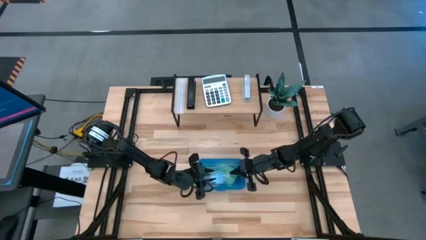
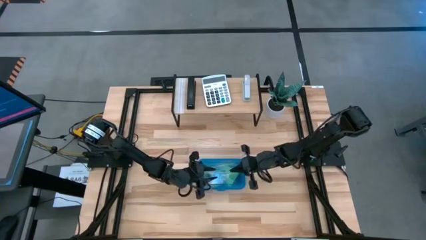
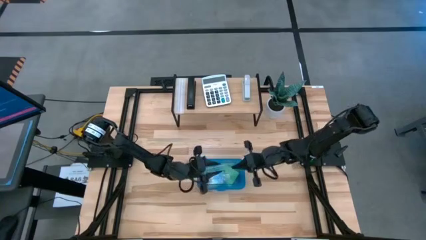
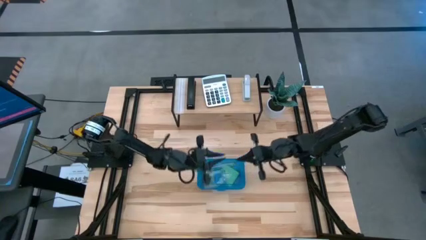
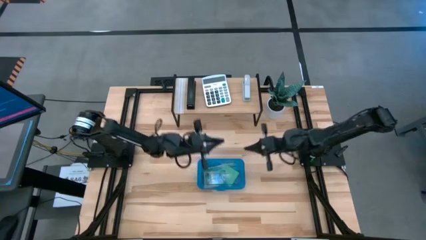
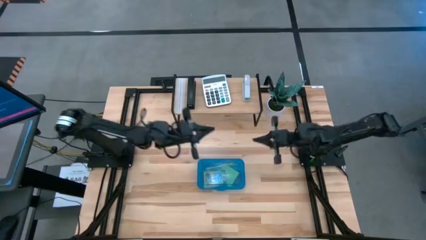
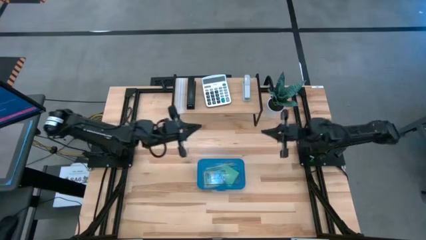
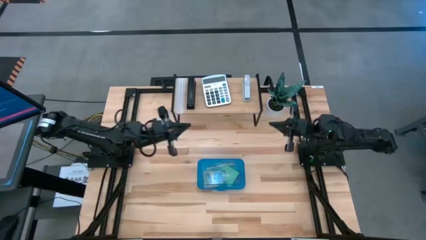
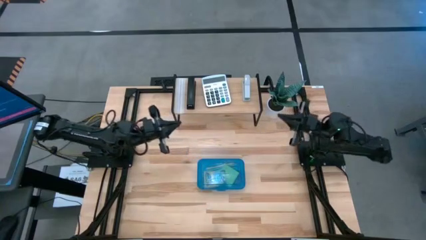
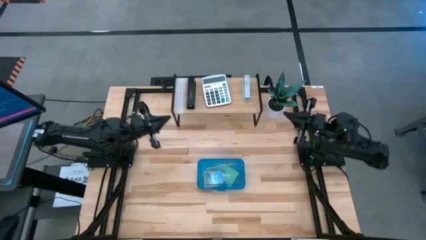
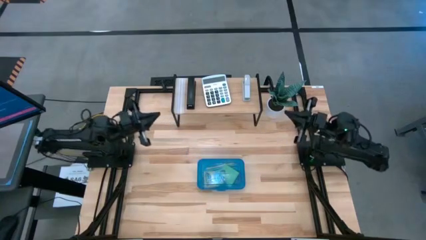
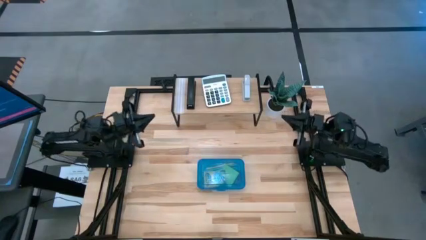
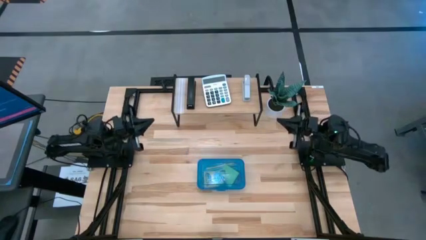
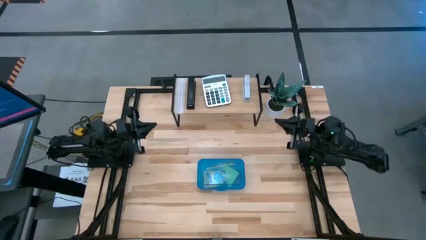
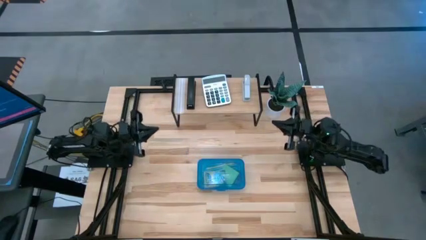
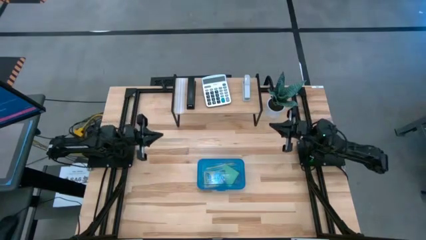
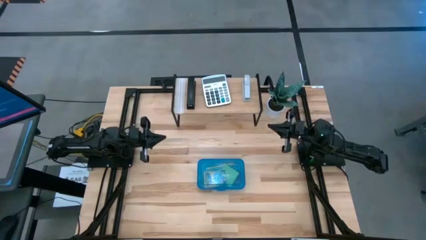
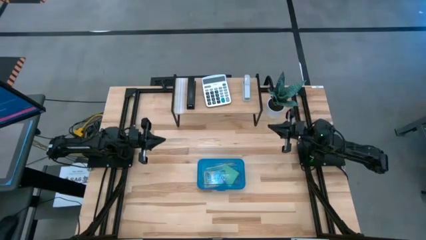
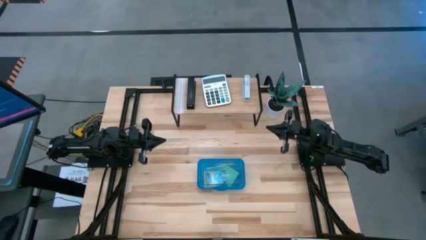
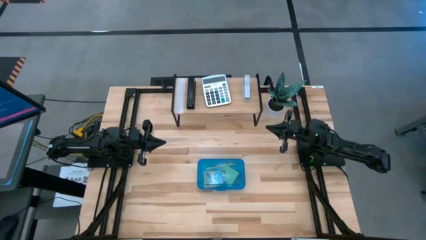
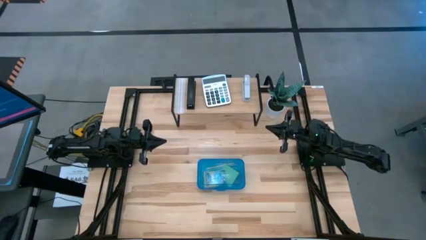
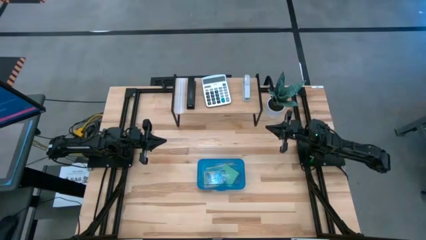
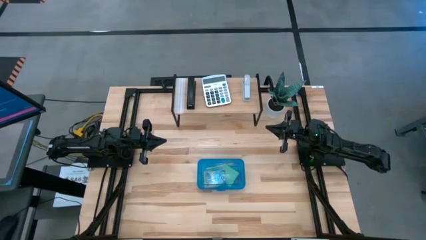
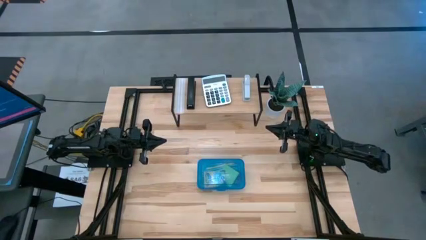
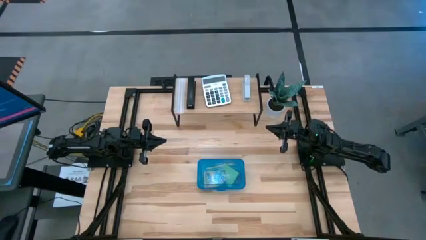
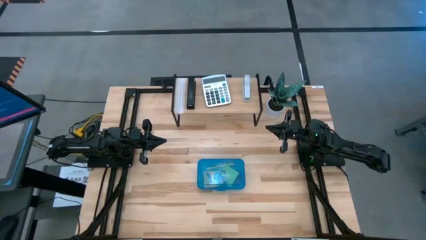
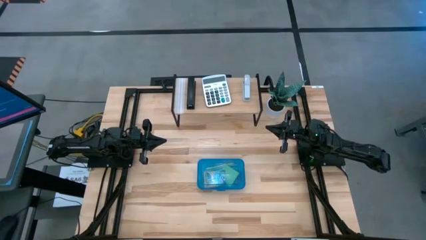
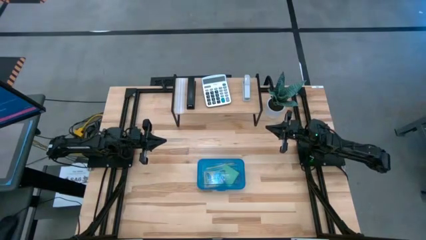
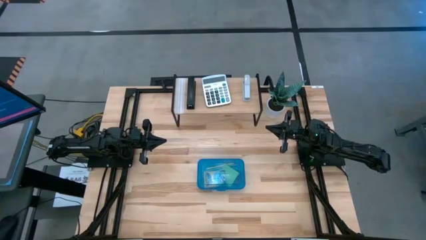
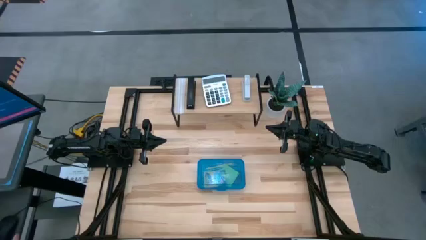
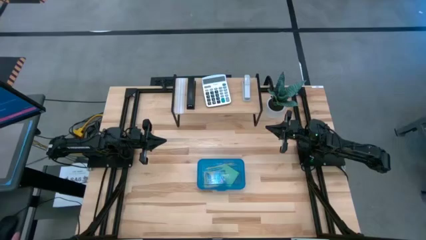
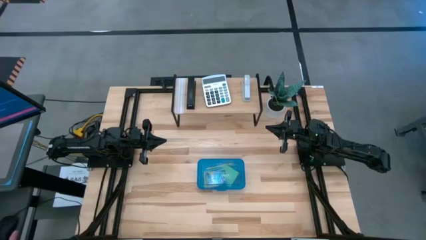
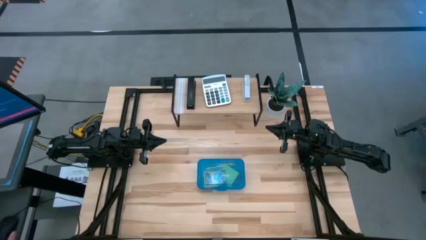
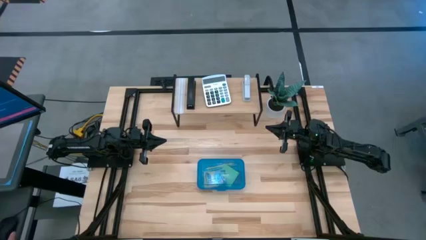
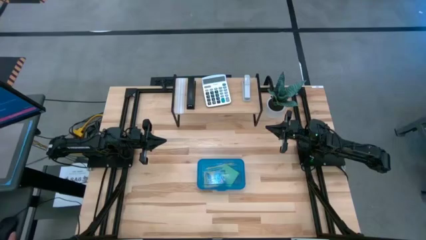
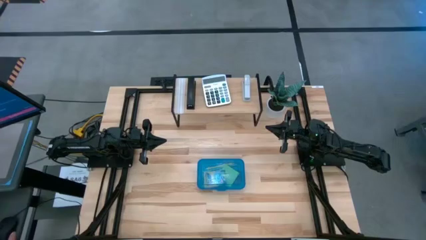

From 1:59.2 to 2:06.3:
Task: Pack school essentials
Return to Home Position

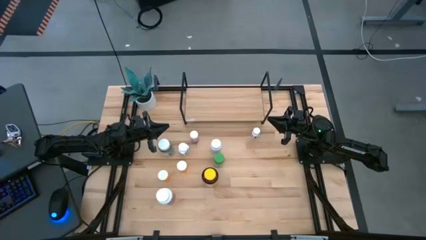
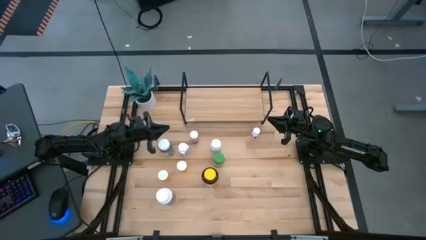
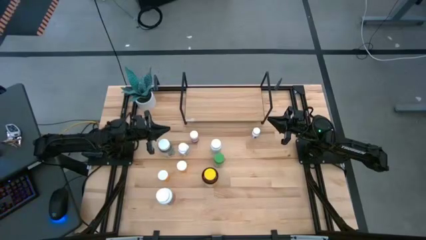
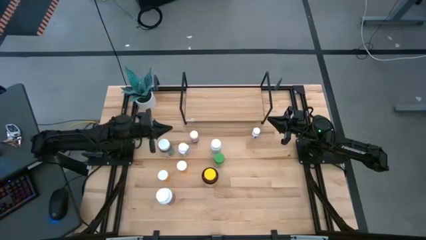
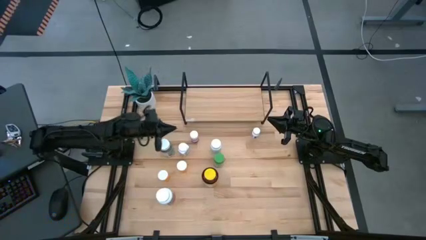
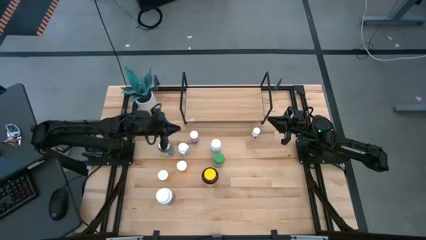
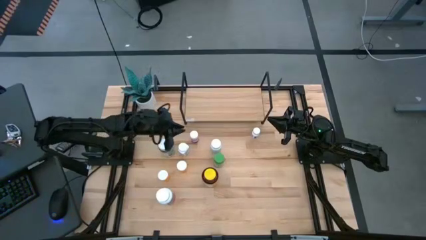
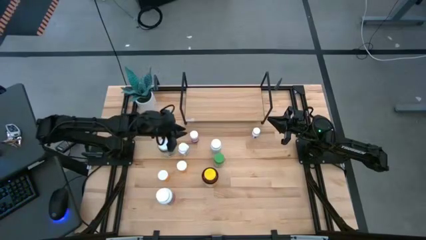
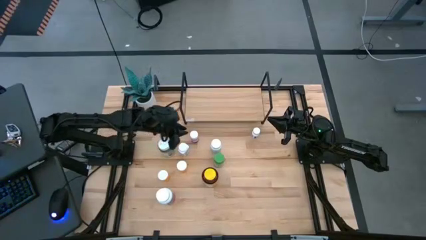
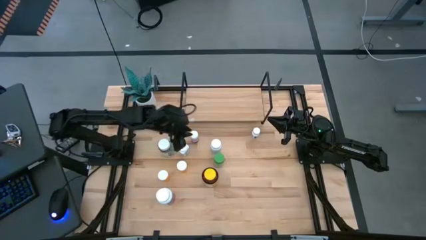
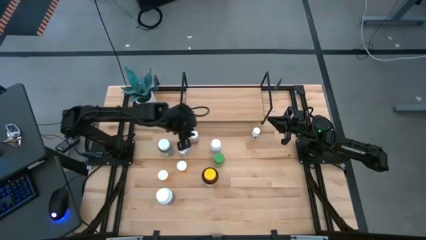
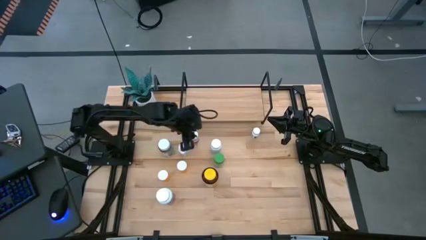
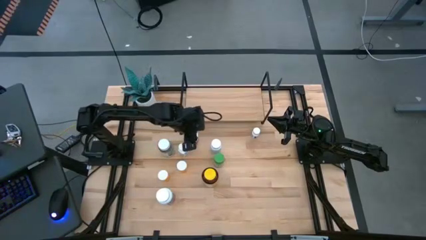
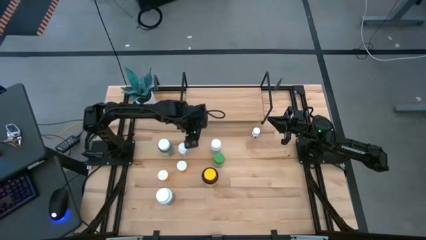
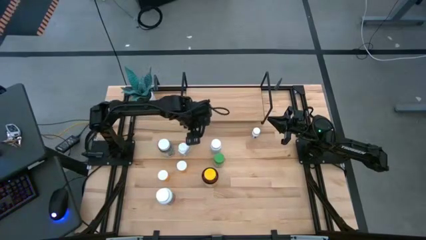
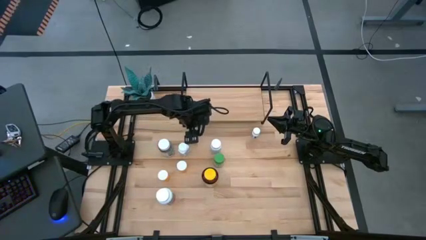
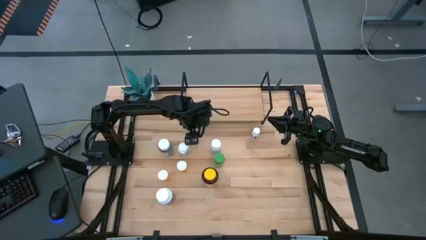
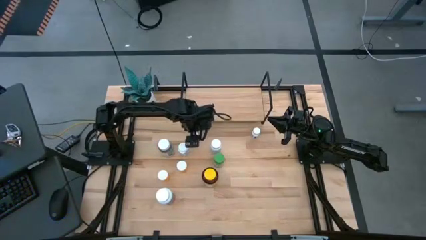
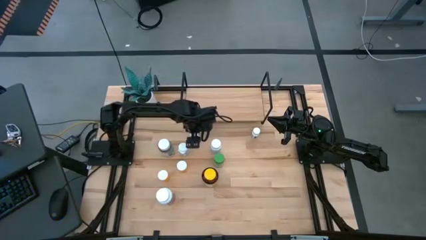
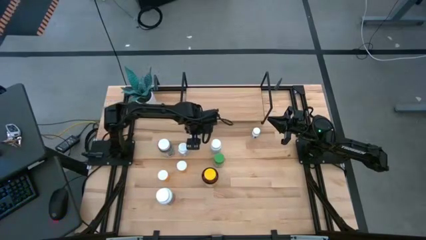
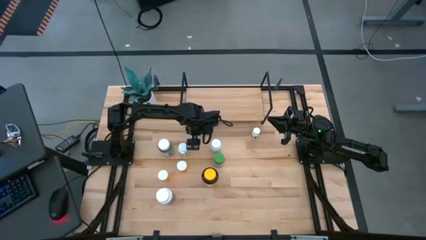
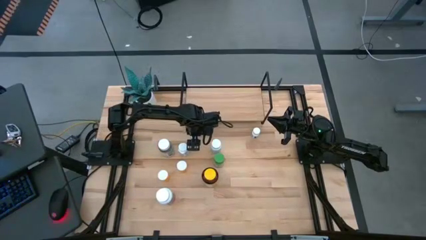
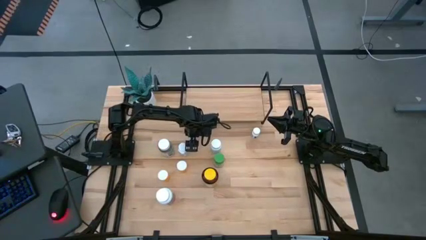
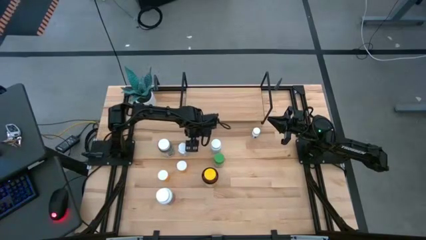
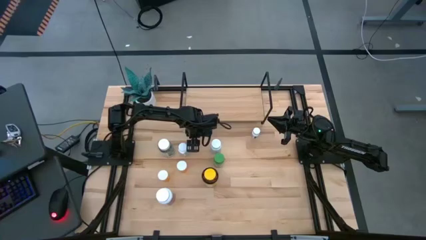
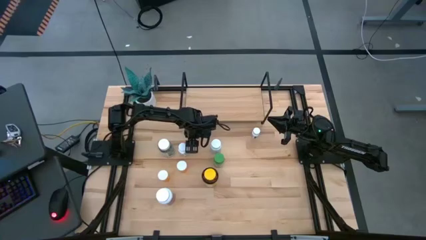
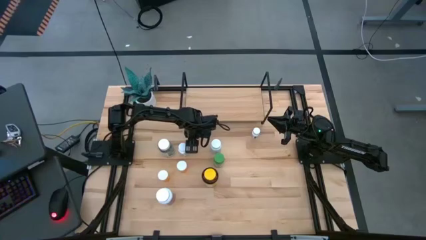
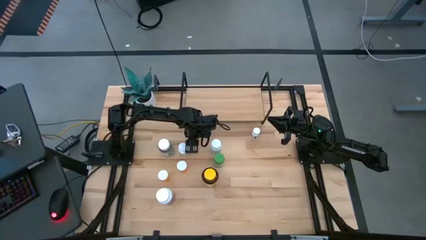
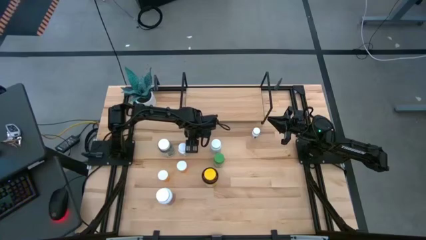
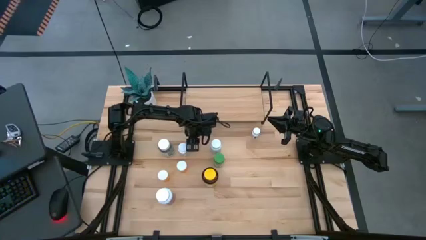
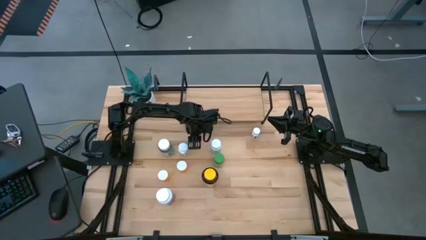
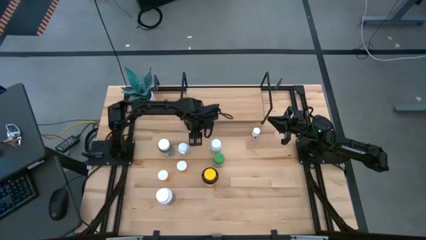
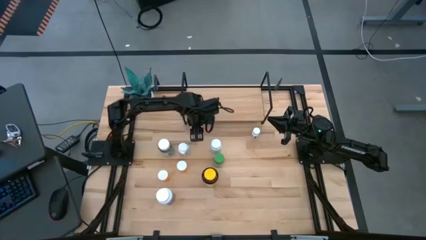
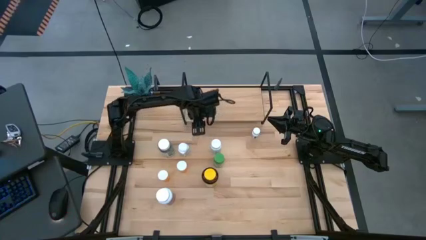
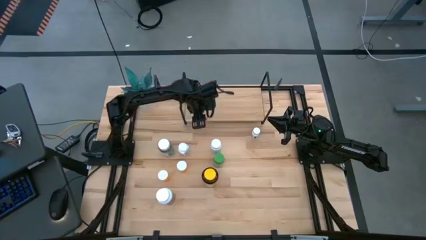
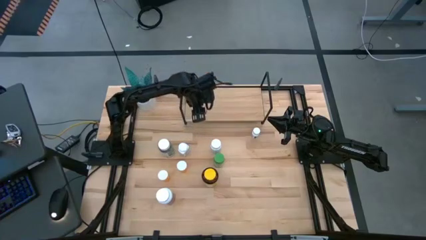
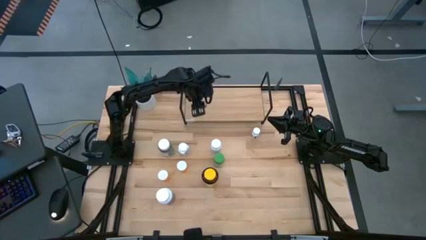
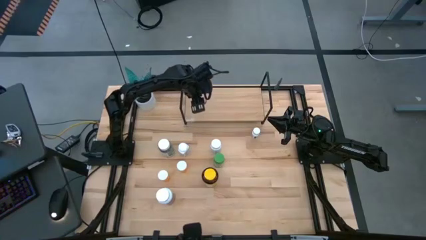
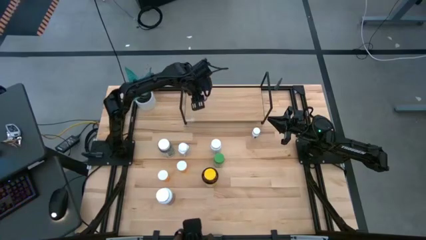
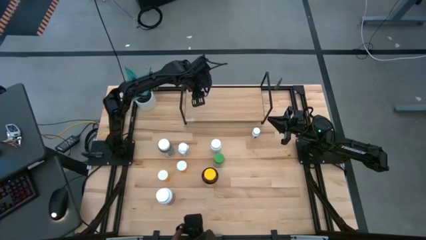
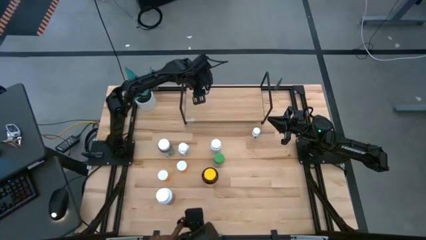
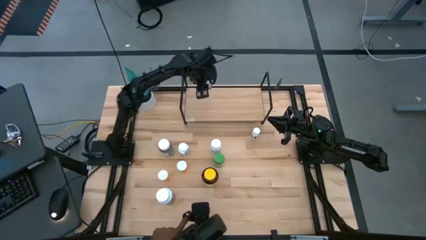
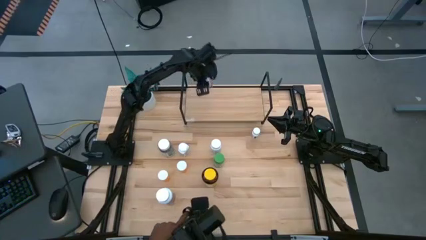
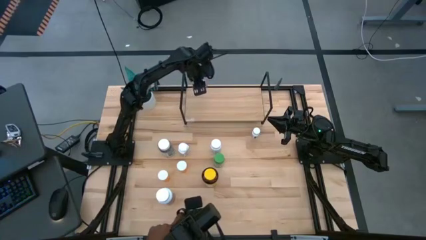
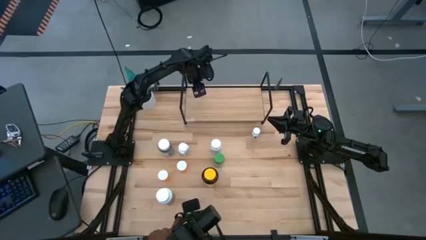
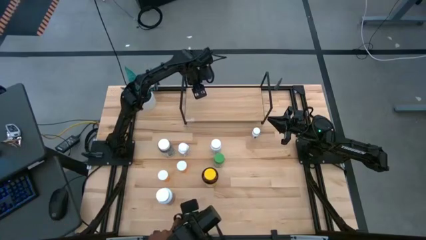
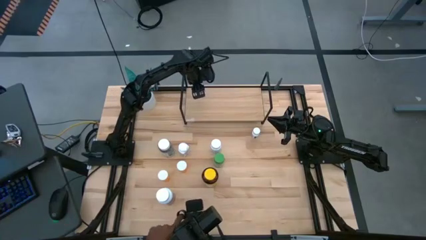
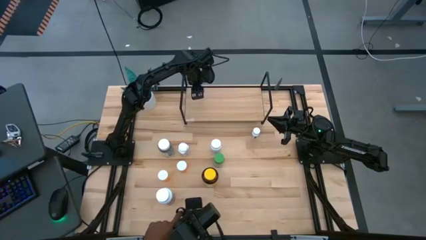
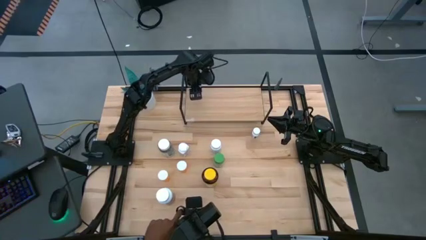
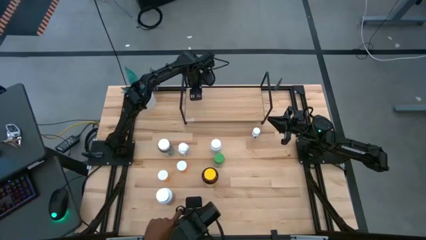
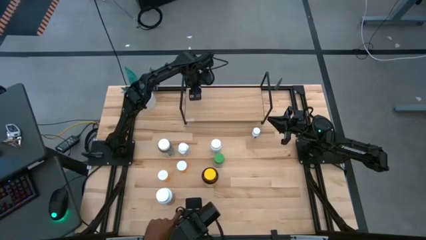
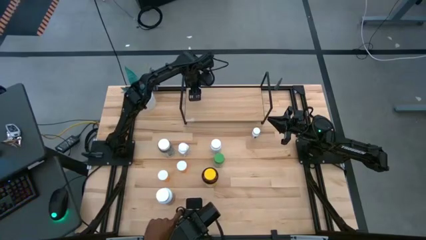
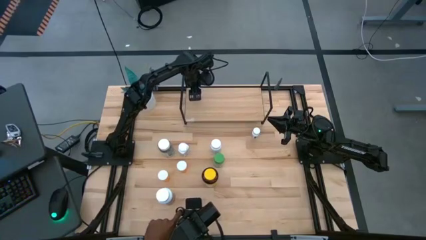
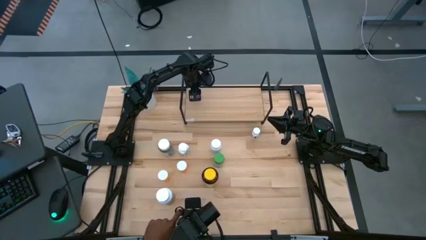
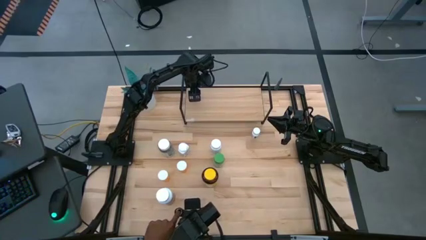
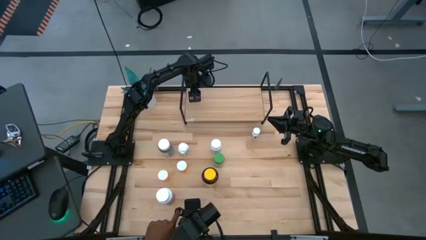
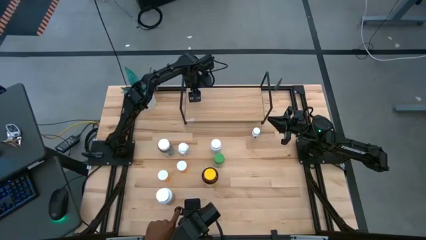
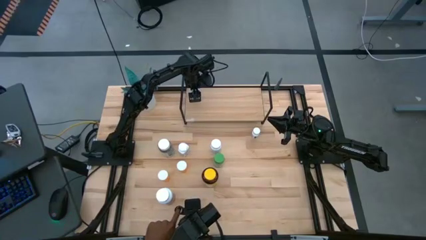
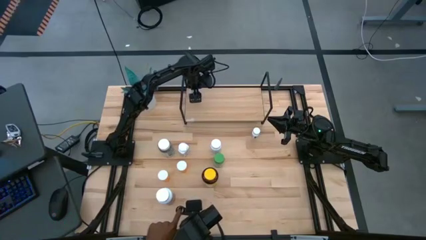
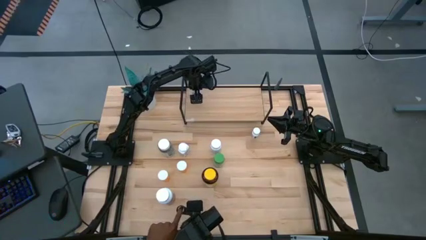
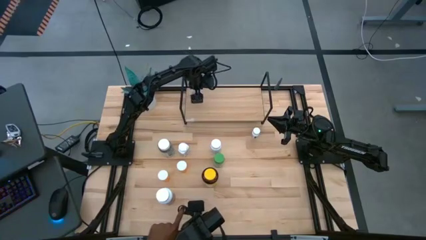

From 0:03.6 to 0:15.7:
Task: Pick and place medicine bottles onto shelf by color
Put the pink pill bottle on the shelf
